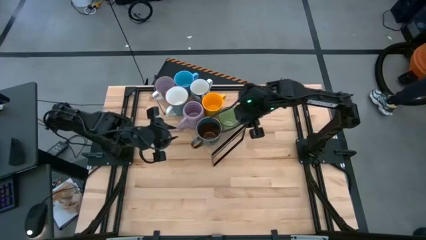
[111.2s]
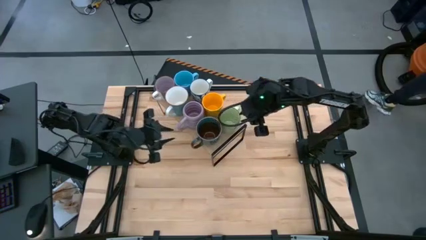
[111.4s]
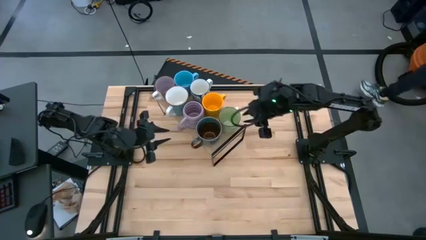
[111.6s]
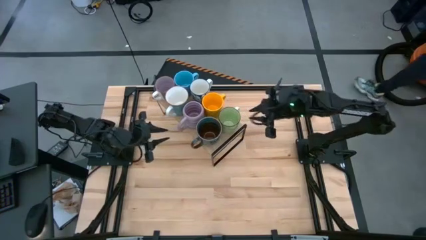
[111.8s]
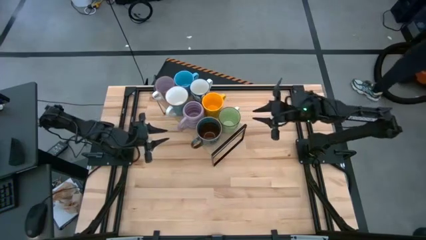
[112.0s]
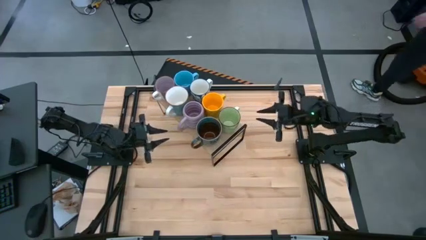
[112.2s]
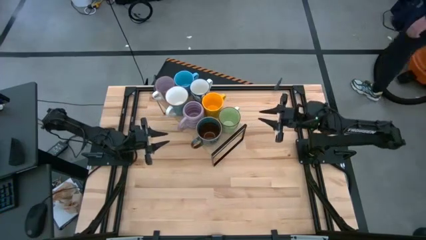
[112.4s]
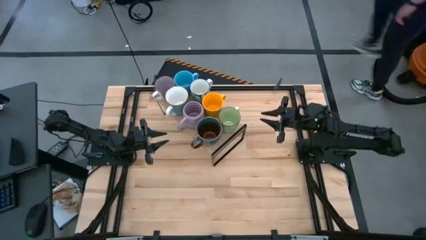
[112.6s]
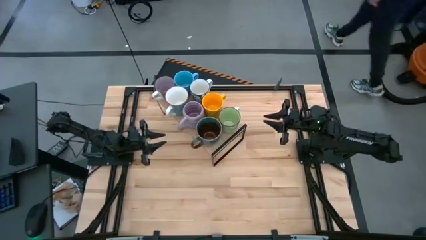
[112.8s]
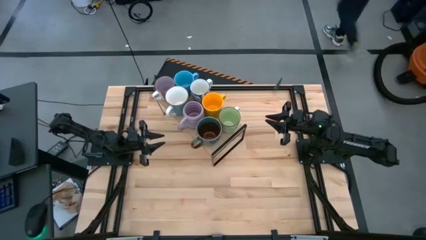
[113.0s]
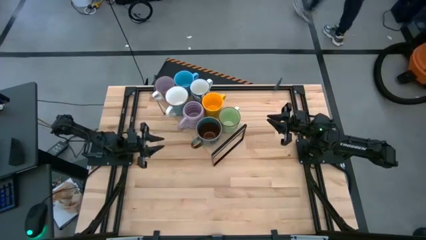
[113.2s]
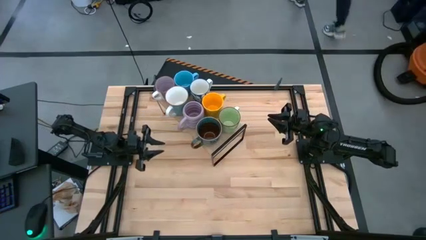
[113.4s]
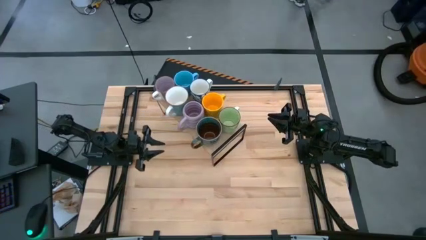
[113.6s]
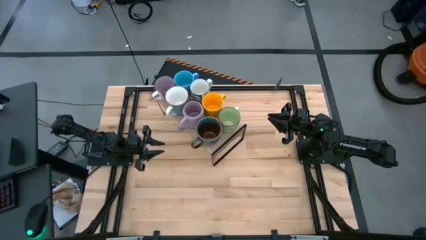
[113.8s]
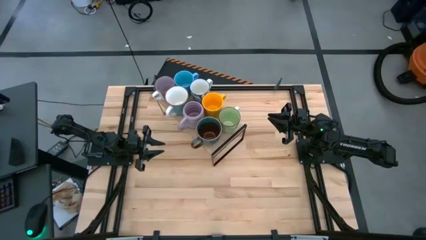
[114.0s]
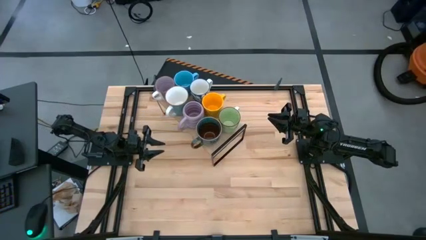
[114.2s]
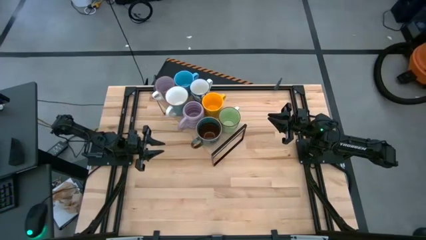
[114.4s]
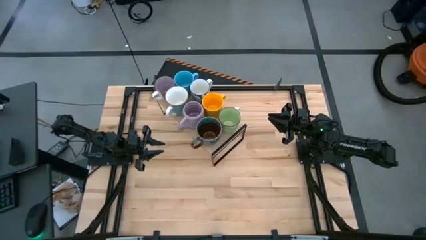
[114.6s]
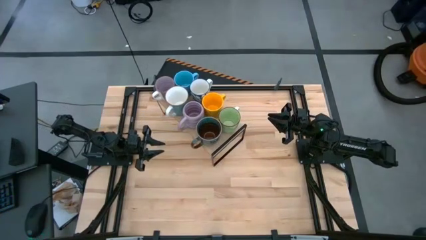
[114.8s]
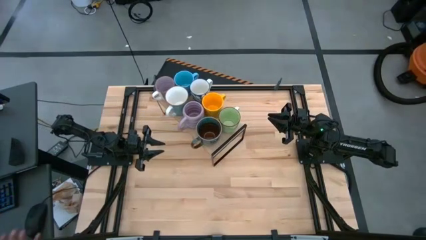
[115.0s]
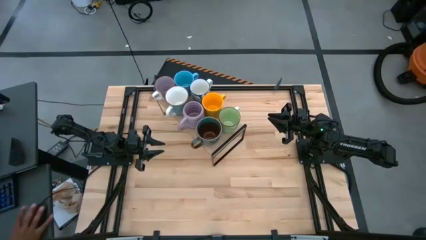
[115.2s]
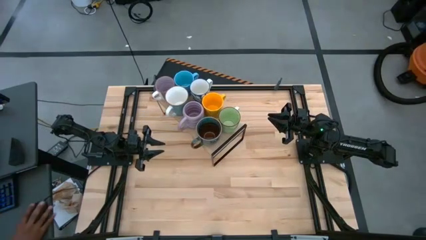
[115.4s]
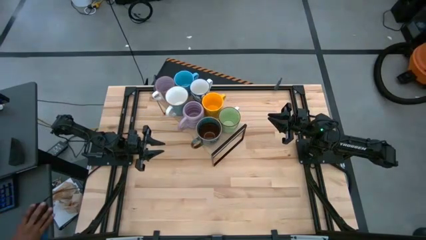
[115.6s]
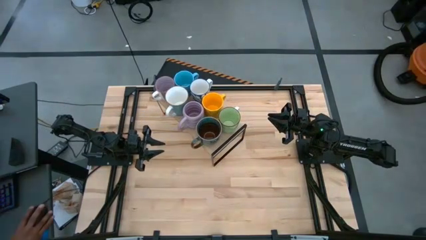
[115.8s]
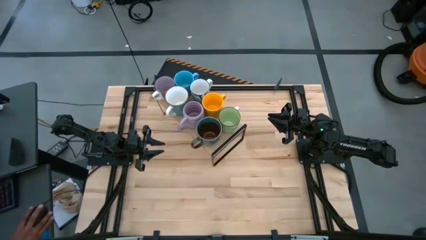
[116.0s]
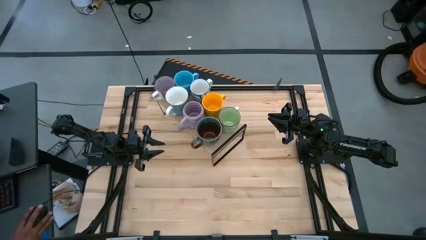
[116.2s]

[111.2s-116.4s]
Task: Place coffee mugs
Return to Home Position

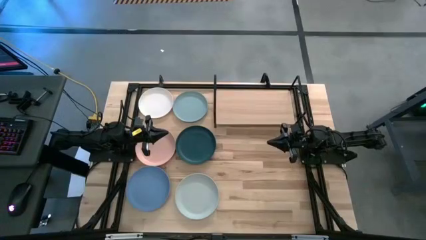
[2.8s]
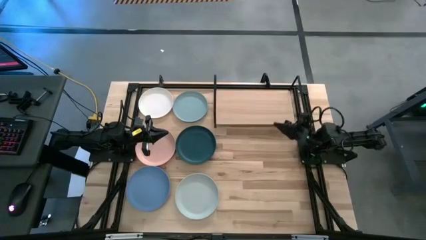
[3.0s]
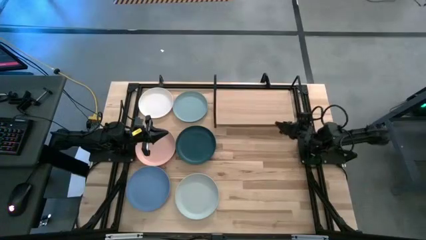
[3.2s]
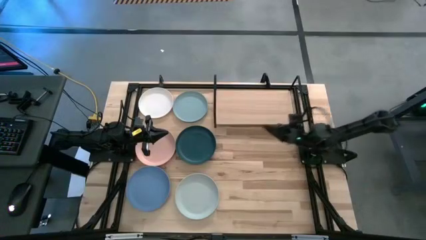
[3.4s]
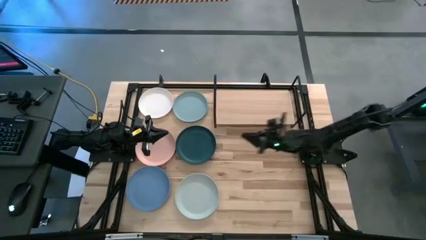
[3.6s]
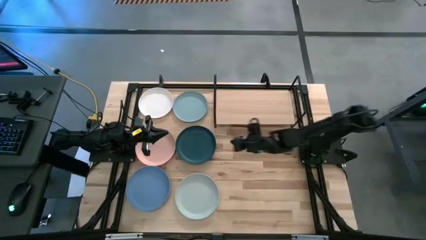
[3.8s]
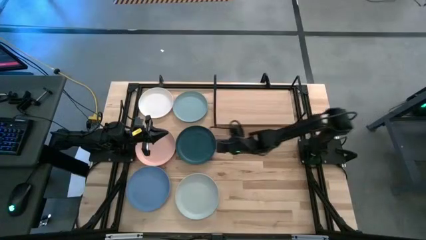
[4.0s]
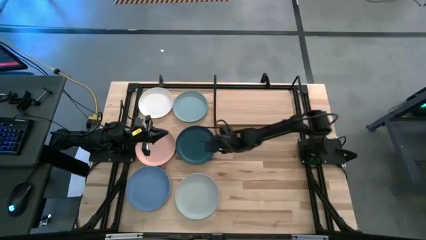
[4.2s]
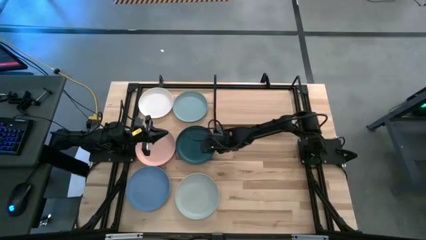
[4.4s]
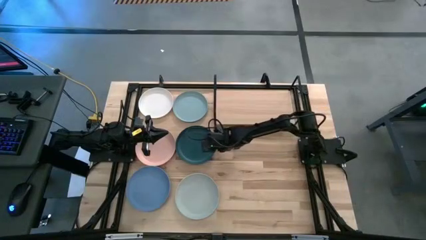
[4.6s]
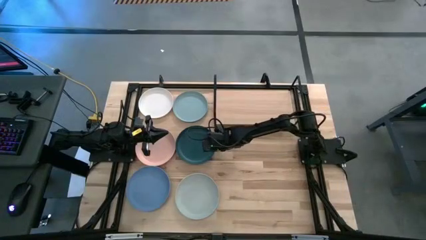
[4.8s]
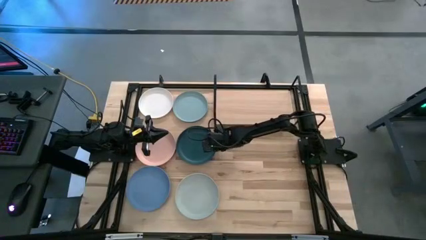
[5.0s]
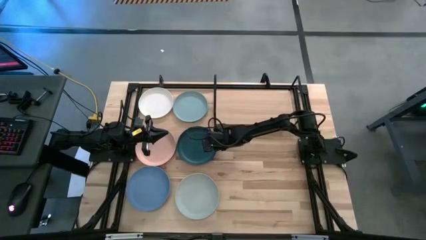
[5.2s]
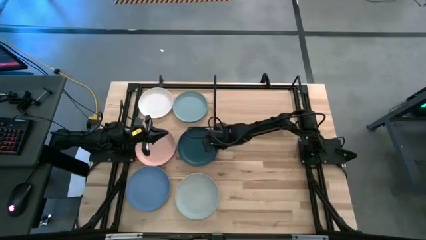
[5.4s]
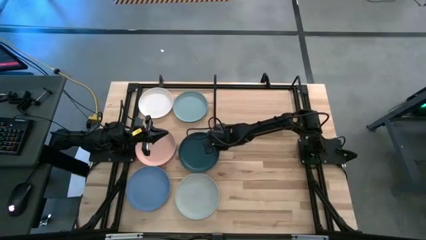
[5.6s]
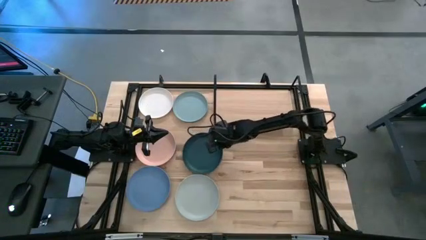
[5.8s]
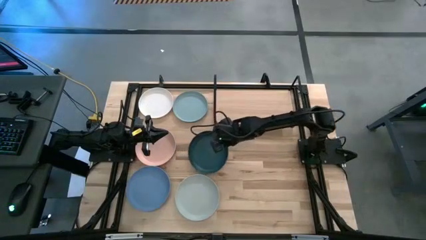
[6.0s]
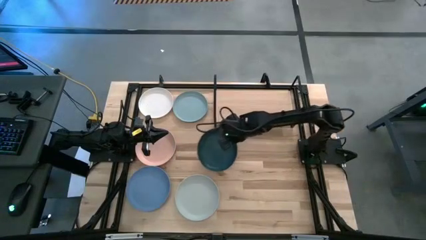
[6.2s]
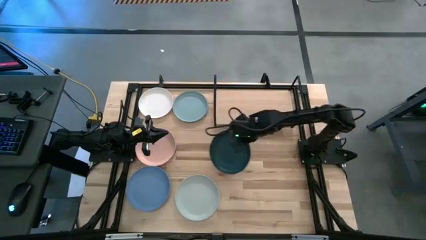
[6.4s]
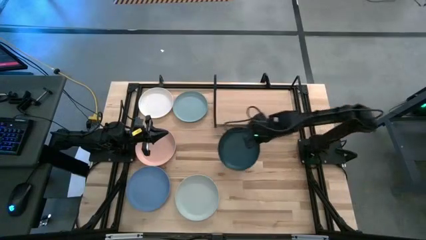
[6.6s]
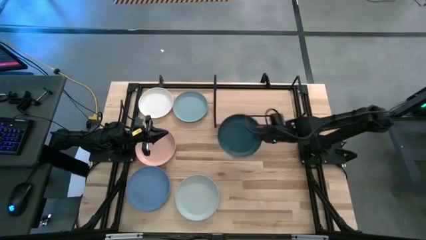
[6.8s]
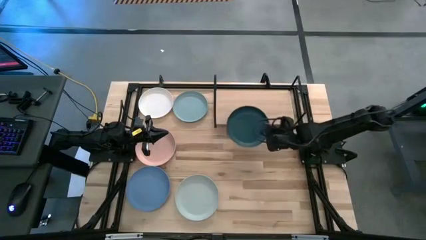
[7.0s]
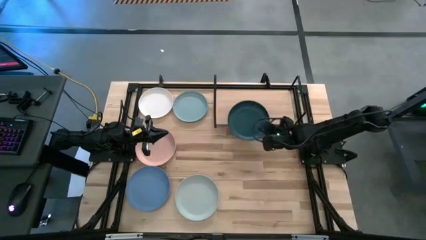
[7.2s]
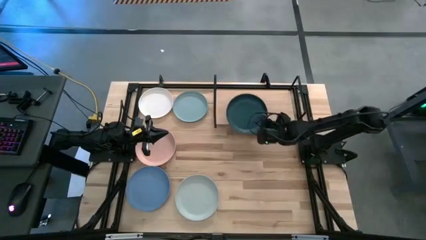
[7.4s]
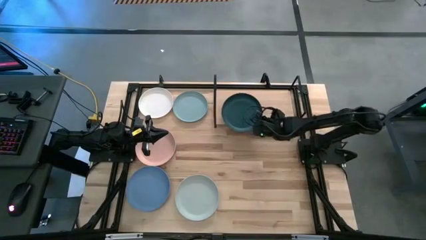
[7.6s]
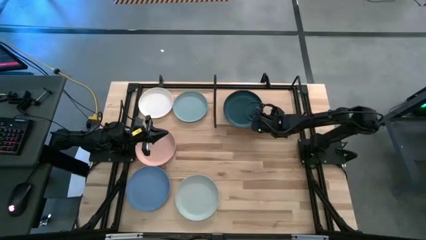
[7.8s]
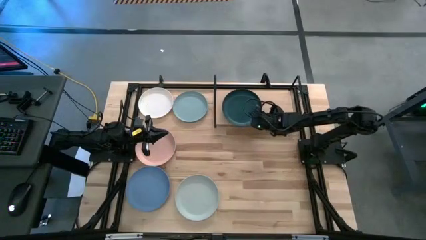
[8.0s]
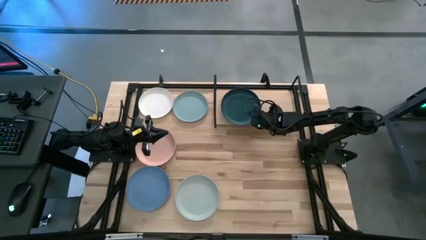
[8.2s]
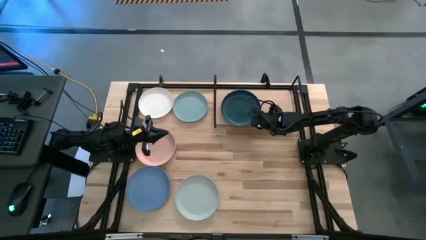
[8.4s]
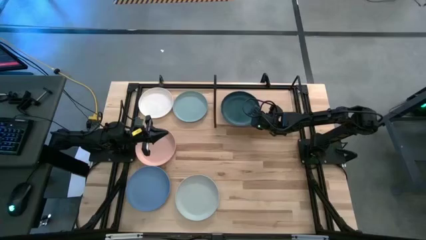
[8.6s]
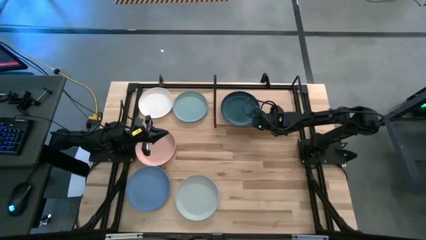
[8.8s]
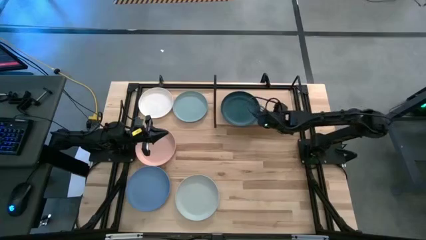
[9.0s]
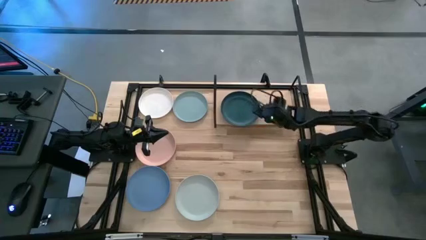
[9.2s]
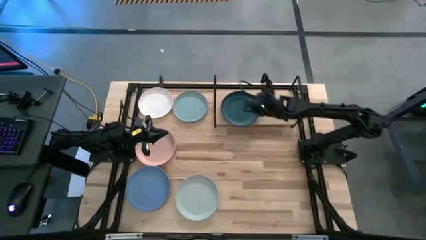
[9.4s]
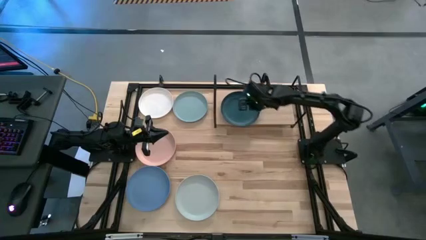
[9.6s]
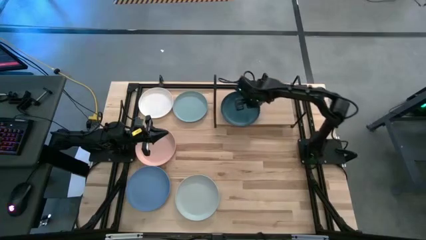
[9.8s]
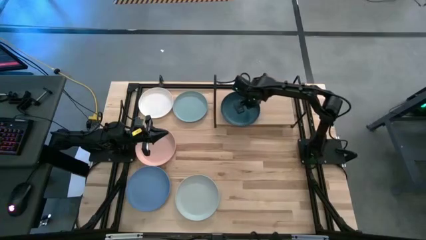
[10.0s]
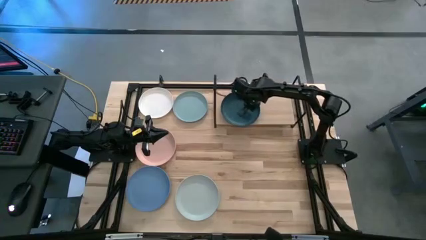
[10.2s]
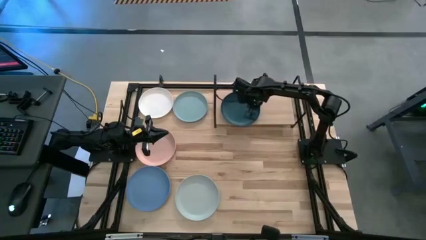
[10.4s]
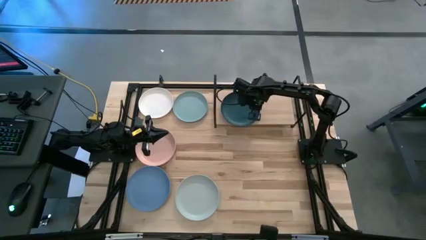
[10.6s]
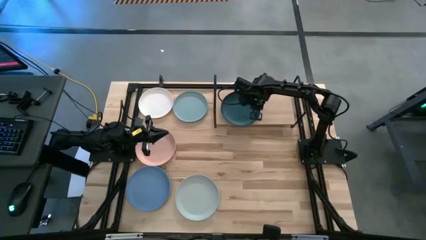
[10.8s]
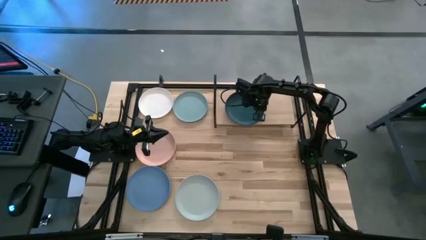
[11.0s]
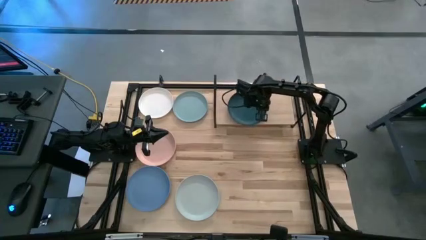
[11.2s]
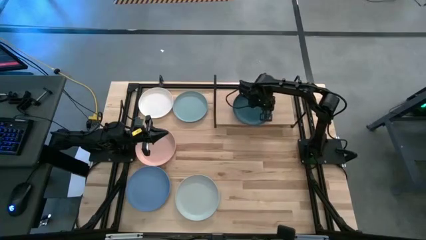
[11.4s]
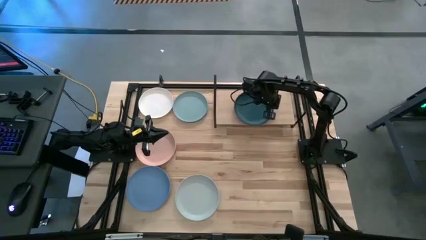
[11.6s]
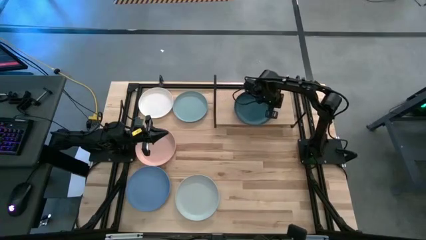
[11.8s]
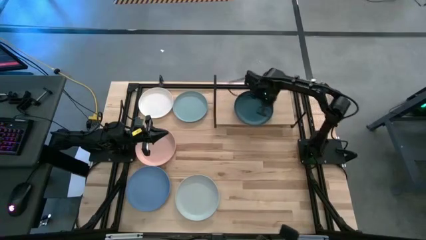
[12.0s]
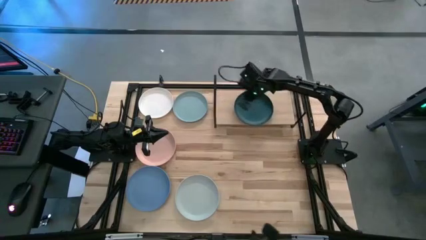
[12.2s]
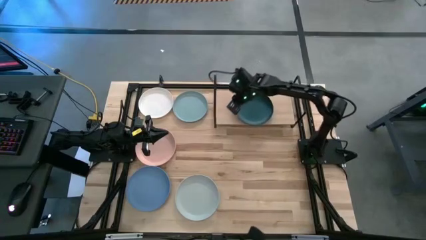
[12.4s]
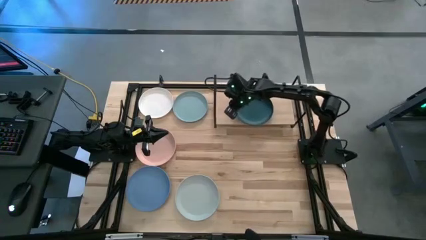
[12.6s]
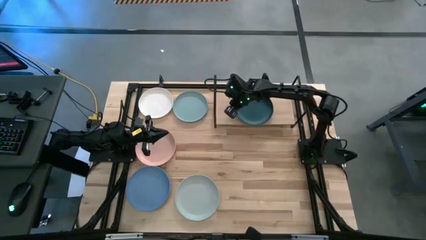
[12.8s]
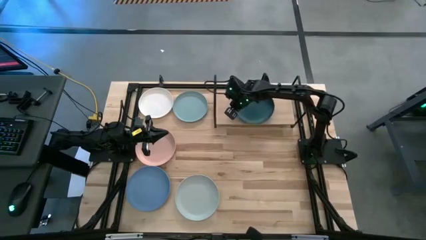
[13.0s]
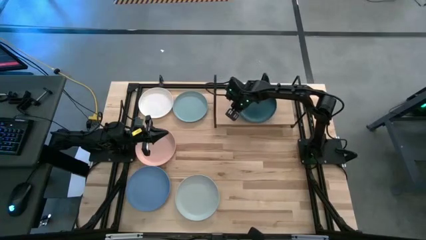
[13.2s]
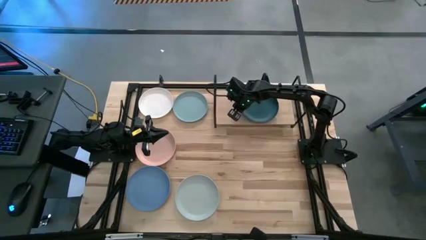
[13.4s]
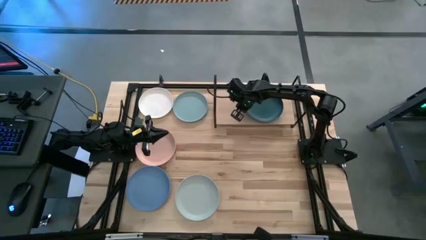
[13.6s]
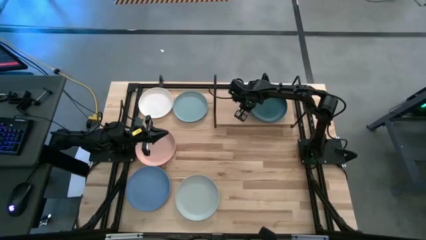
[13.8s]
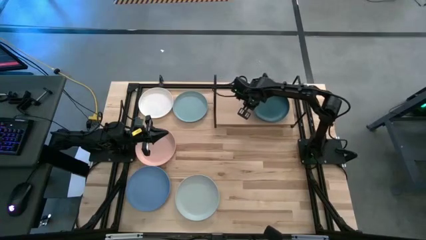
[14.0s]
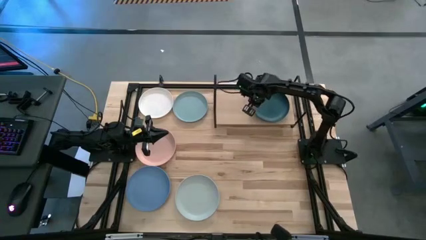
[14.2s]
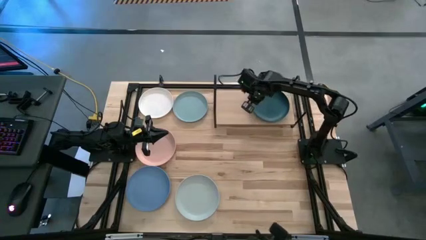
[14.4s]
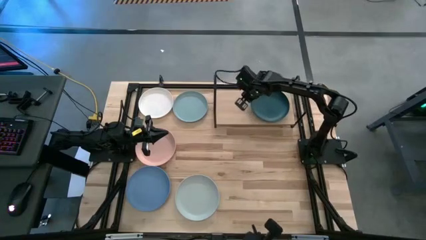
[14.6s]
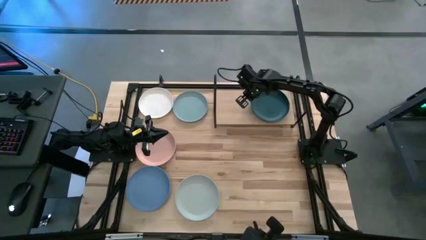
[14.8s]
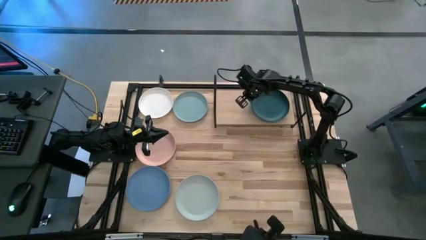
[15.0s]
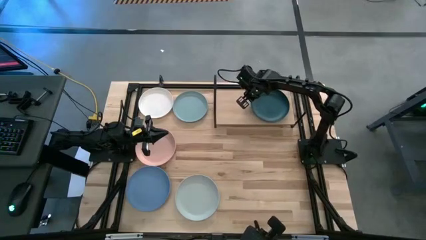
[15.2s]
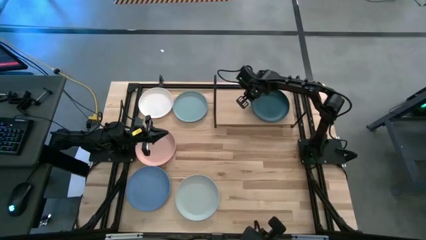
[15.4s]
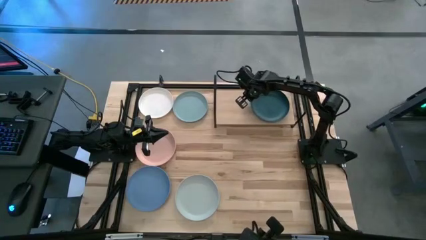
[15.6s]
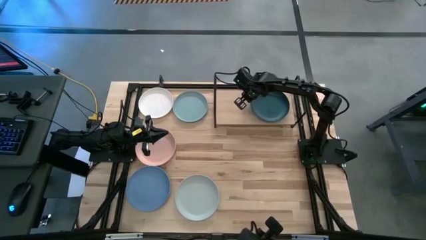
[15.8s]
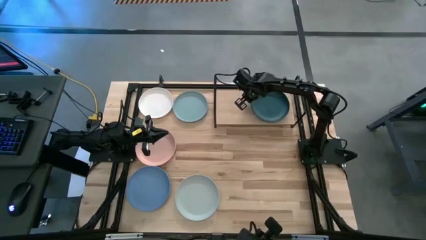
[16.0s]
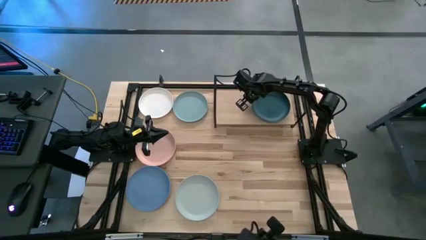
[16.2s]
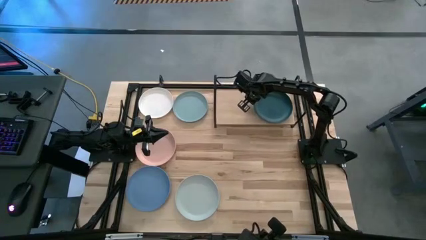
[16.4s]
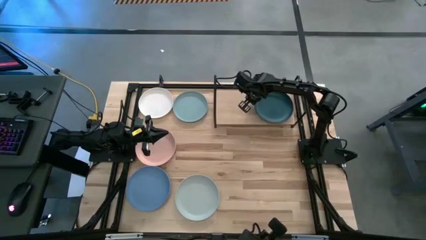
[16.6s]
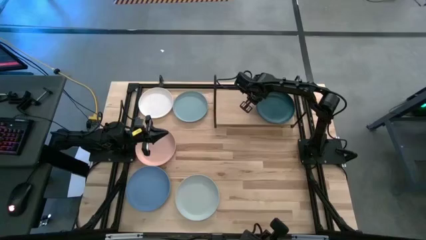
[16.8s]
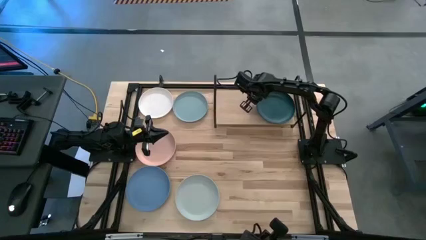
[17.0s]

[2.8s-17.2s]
Task: Place and stack plates onto a shelf
Put the green plate on the shelf
